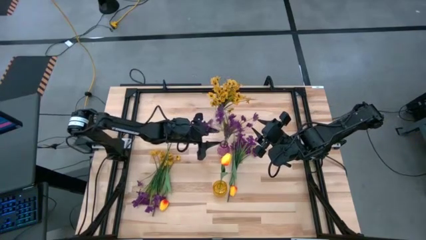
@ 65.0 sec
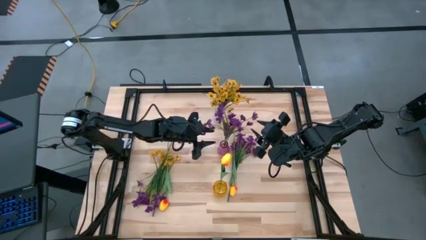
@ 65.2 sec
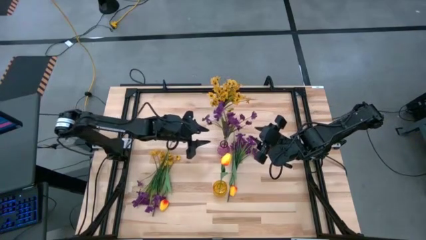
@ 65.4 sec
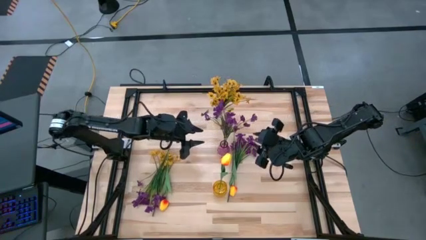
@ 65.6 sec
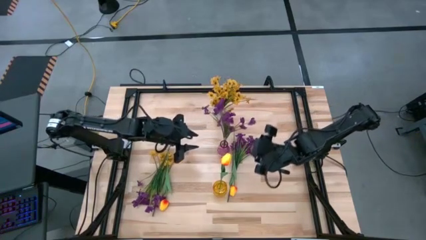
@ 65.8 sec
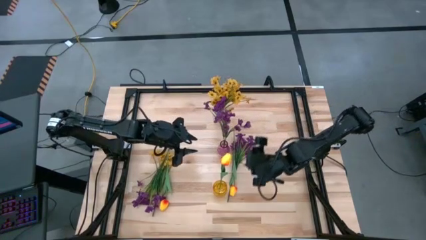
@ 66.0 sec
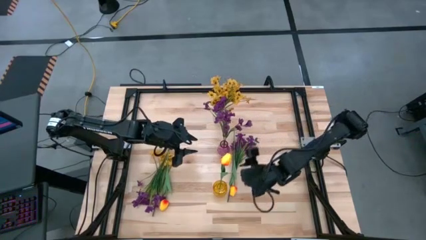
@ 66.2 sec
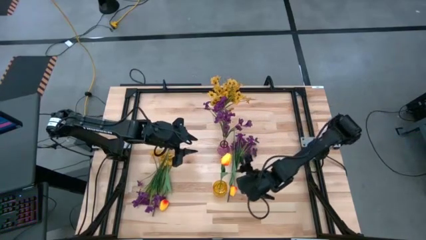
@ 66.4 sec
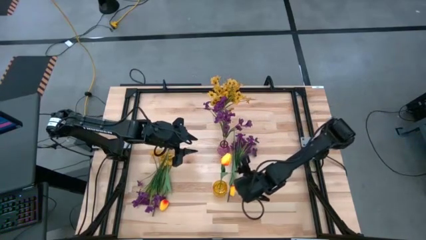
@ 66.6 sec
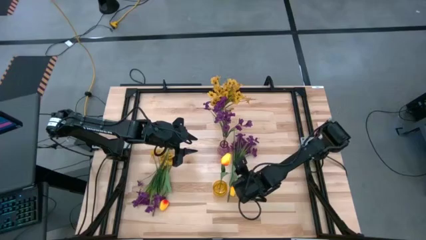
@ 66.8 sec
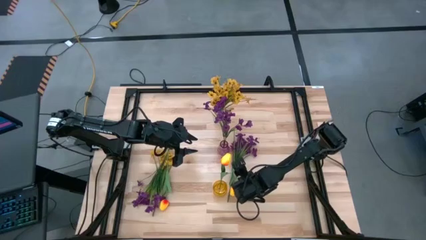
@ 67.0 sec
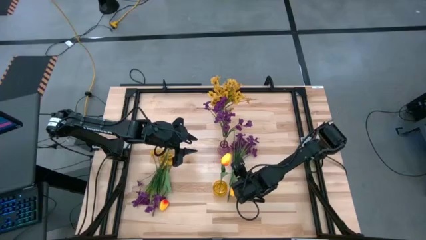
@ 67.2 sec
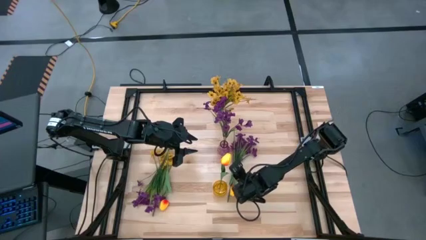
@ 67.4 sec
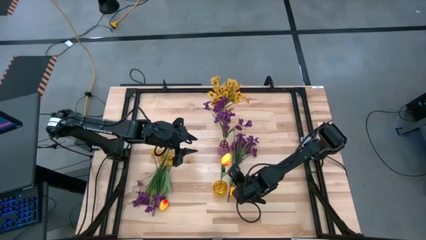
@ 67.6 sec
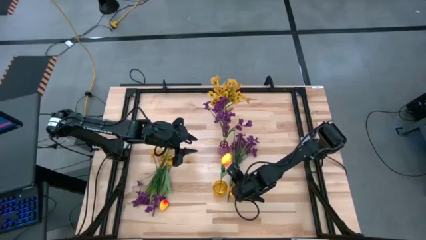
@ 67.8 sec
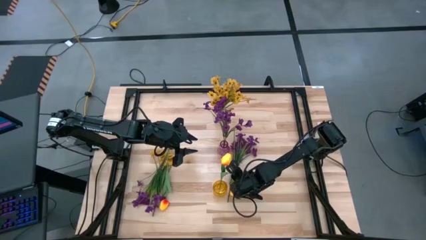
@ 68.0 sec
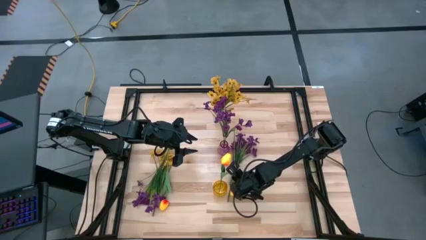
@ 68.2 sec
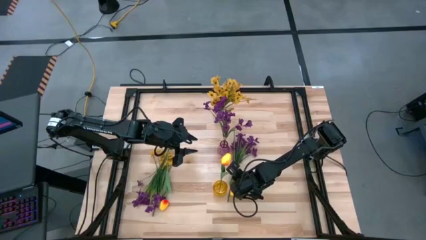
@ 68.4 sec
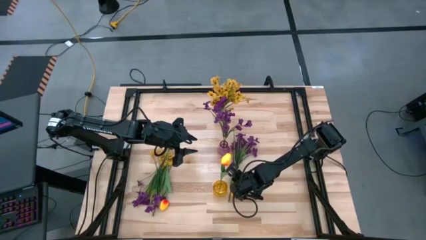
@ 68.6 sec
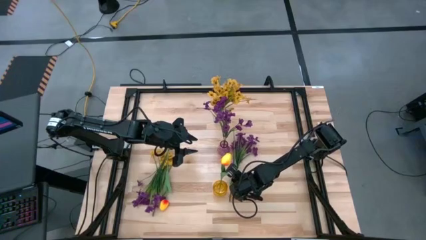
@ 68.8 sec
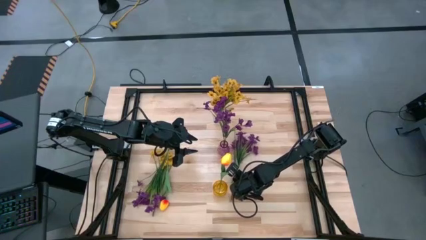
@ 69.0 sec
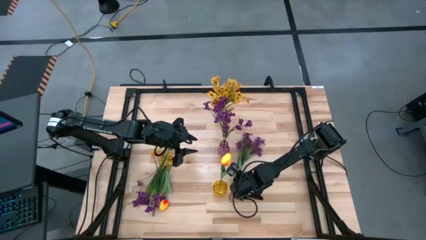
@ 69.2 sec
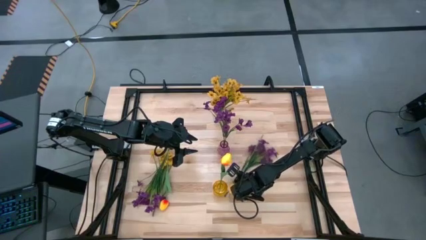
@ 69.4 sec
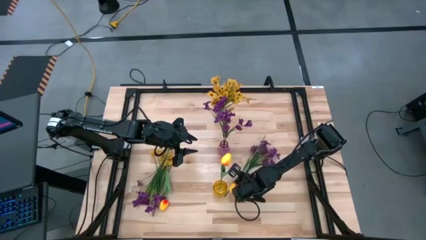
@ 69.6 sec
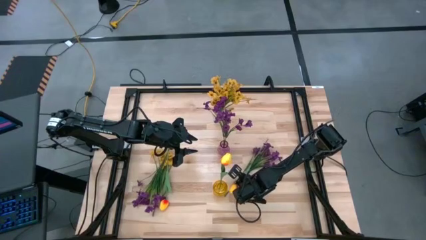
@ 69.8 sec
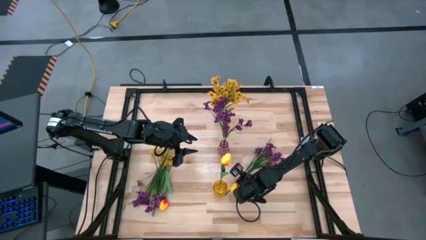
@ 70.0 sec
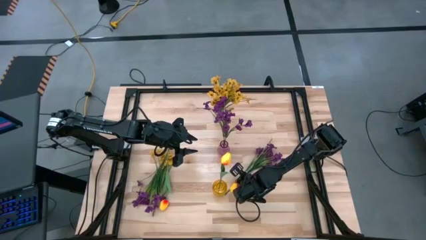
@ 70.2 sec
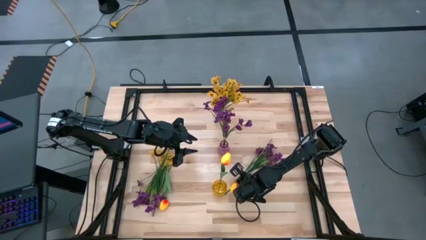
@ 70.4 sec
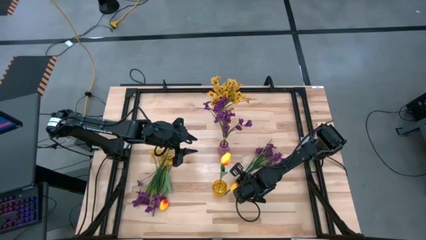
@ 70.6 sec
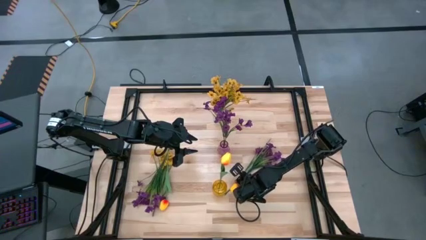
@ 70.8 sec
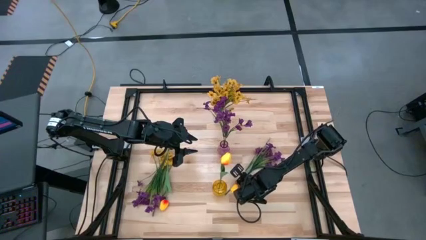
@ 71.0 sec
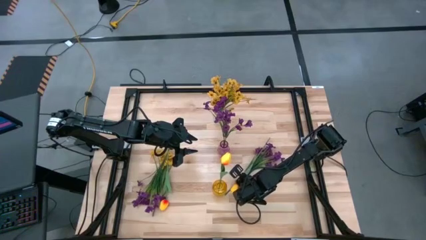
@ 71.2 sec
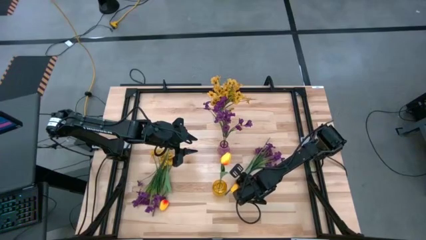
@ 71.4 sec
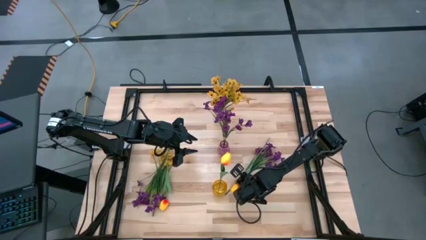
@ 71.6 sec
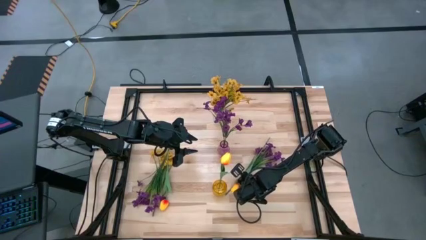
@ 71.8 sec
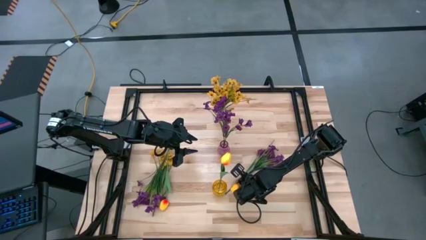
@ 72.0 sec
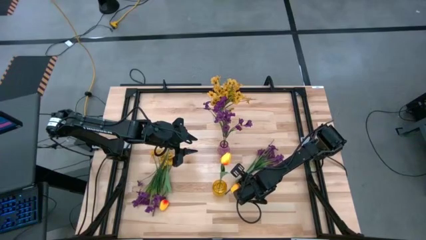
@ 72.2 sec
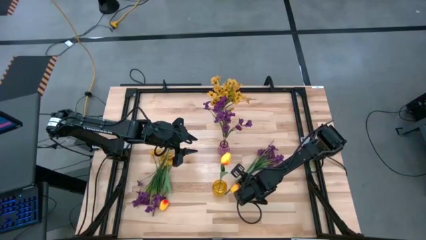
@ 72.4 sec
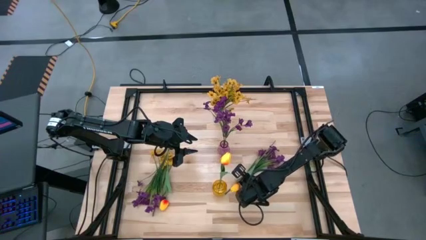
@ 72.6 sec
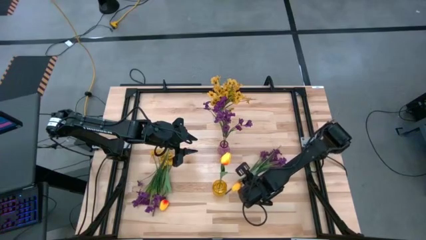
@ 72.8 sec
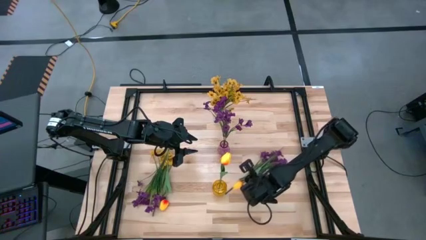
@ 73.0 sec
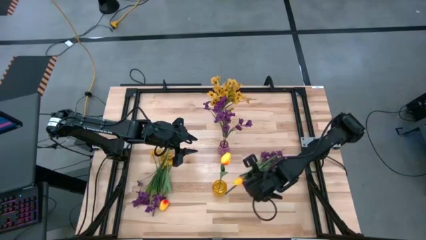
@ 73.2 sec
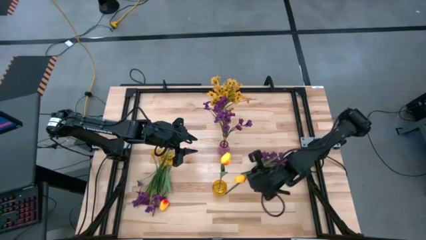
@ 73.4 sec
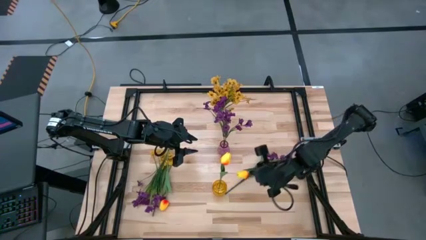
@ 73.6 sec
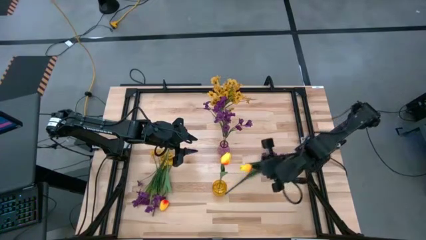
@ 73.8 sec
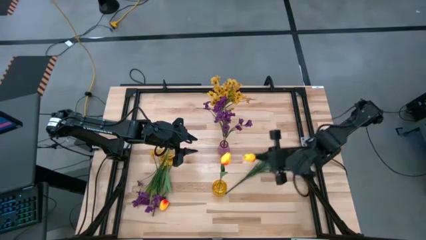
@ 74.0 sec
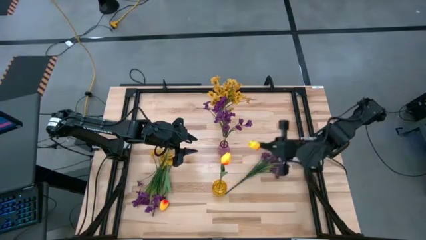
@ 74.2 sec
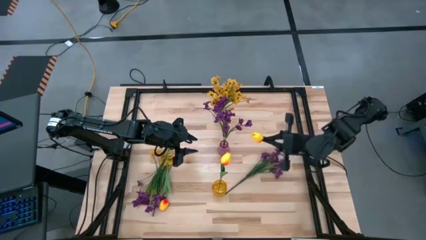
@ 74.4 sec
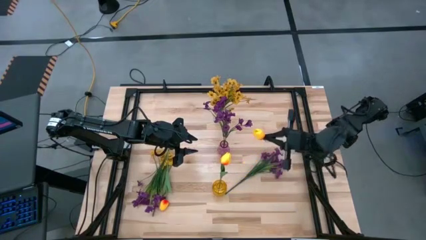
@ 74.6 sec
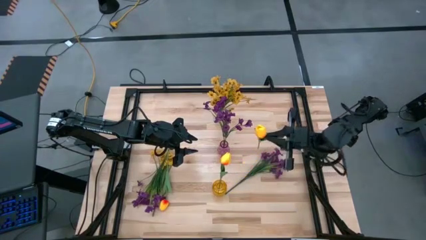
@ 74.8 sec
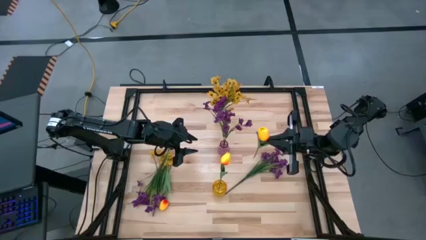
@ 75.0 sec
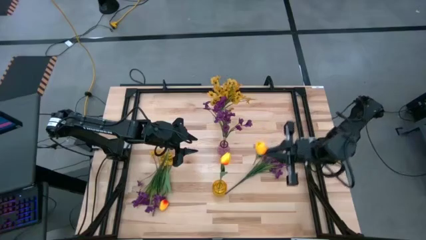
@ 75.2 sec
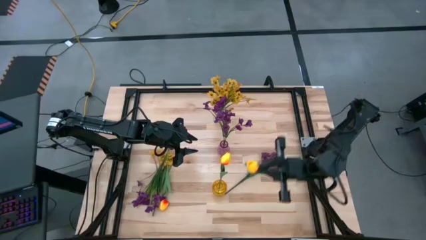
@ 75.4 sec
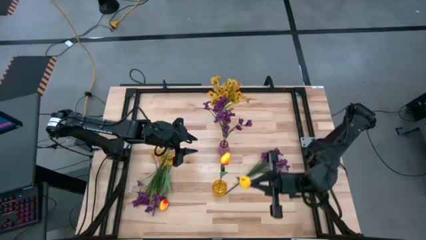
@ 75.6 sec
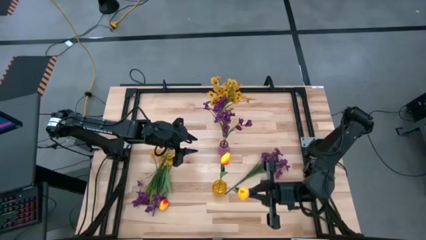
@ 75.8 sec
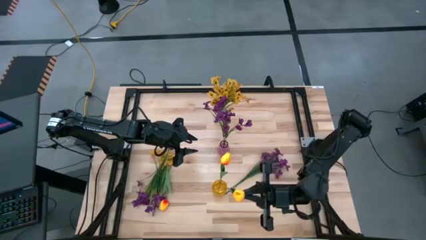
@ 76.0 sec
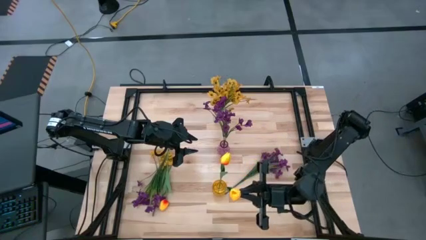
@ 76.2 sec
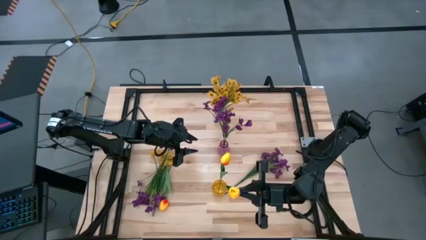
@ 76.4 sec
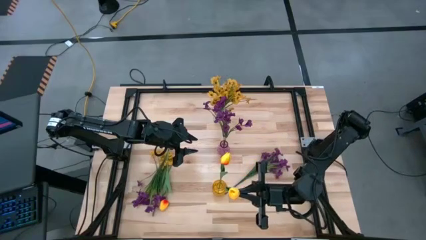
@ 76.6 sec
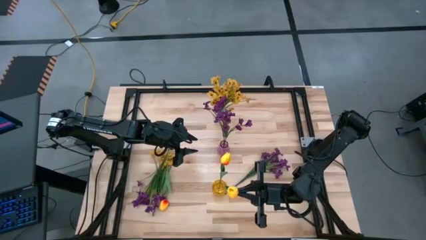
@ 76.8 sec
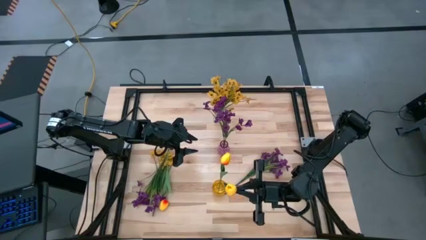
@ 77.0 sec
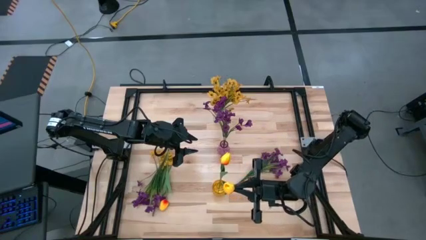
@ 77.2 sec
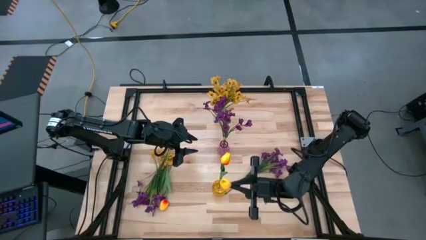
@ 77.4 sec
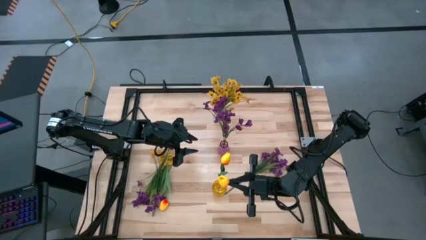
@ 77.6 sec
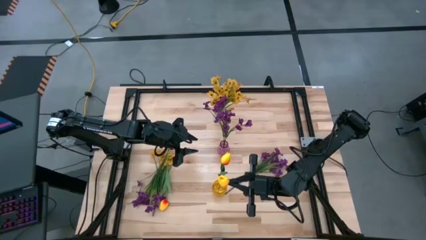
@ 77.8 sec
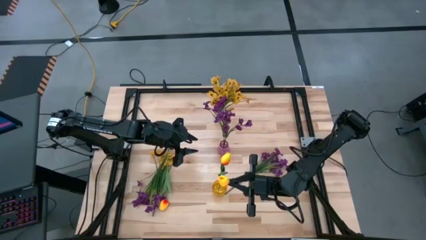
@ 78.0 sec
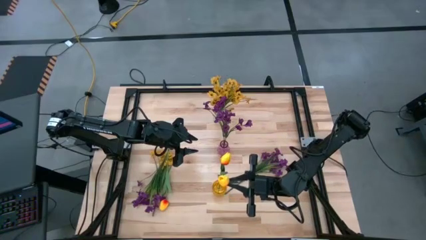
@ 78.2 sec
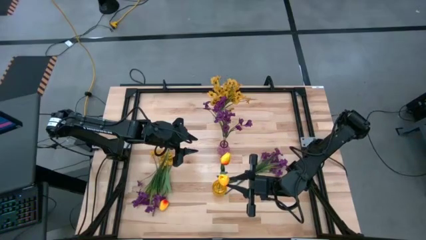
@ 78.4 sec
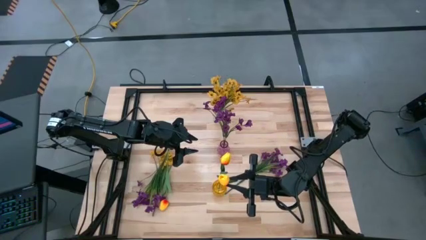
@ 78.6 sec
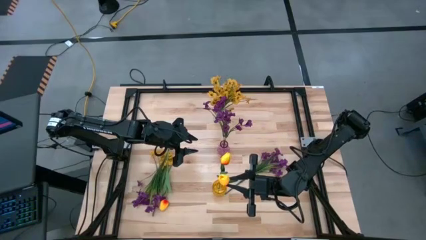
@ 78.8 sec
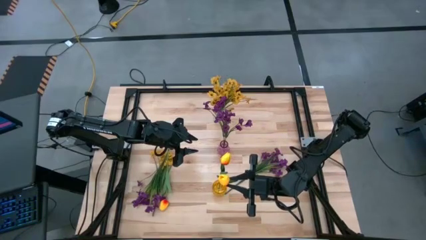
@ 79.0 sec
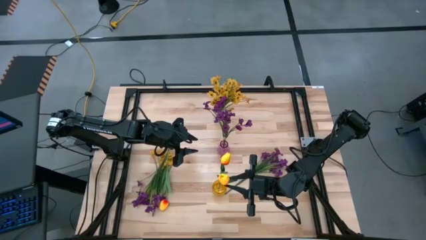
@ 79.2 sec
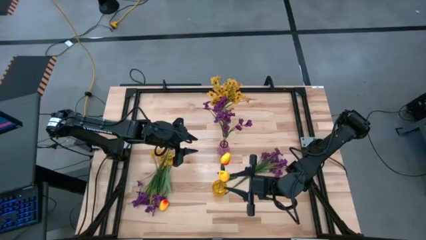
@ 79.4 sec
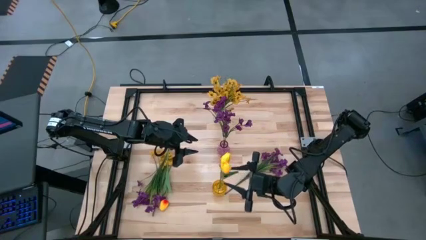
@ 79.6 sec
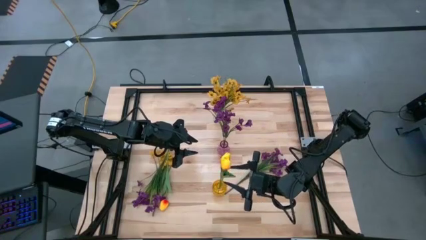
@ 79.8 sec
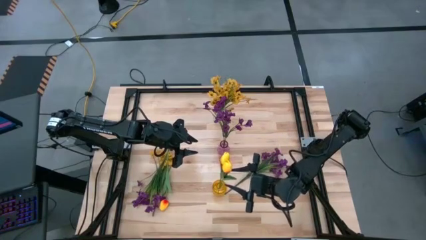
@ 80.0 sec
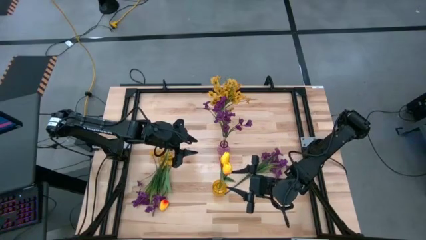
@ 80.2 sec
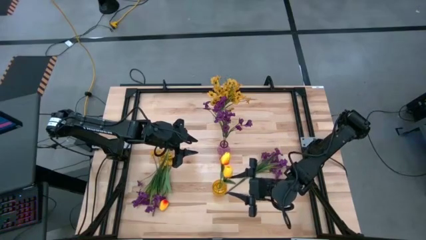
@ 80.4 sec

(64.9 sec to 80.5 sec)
Task: Sort flowers into vase by color
Put the right yellow tulip into the yellow vase
